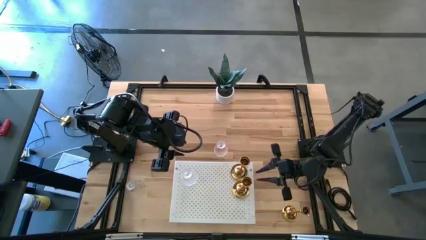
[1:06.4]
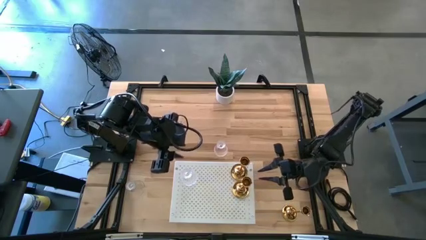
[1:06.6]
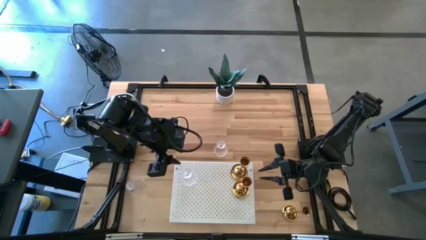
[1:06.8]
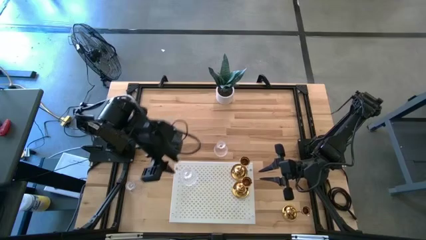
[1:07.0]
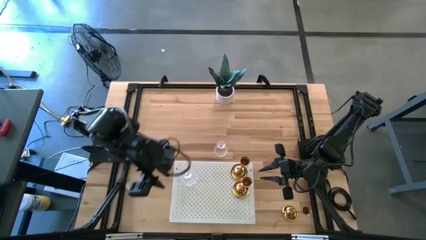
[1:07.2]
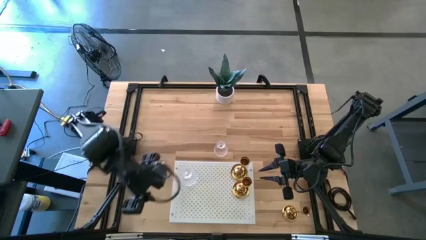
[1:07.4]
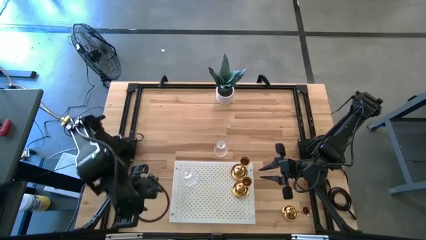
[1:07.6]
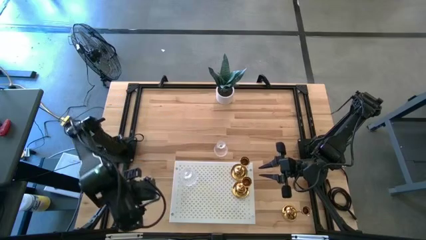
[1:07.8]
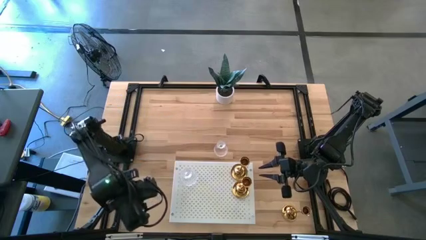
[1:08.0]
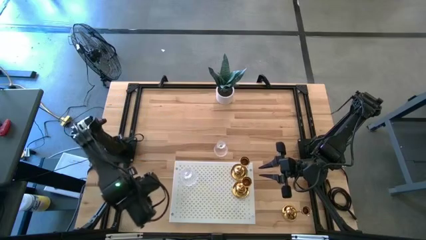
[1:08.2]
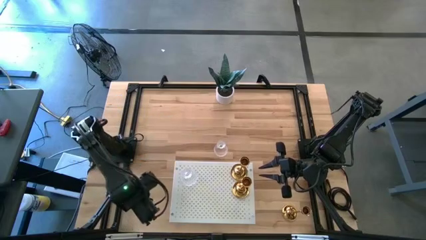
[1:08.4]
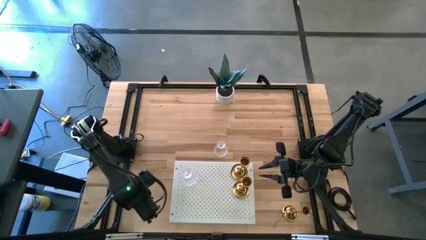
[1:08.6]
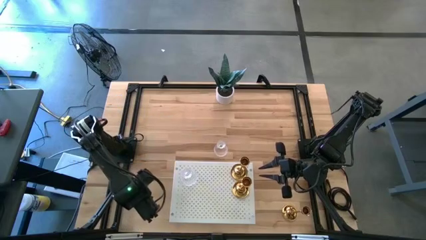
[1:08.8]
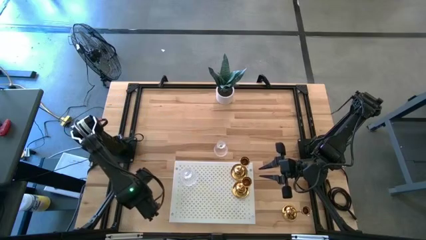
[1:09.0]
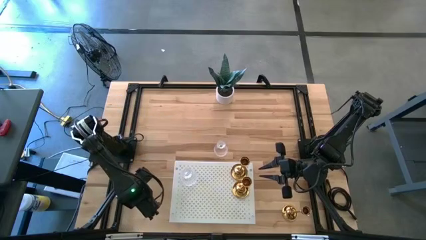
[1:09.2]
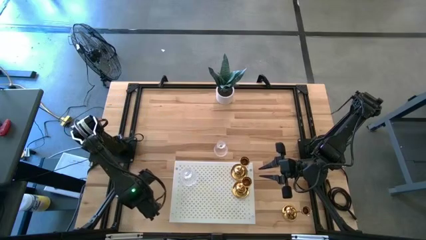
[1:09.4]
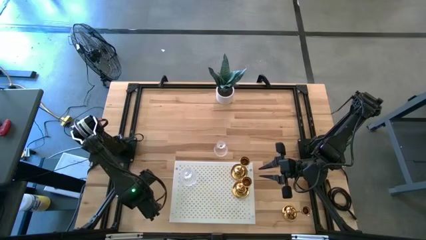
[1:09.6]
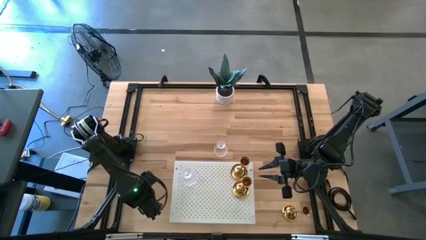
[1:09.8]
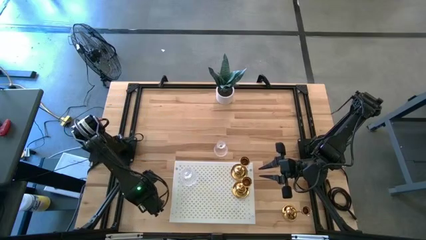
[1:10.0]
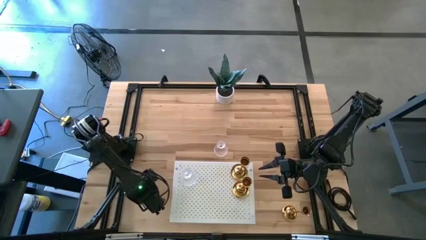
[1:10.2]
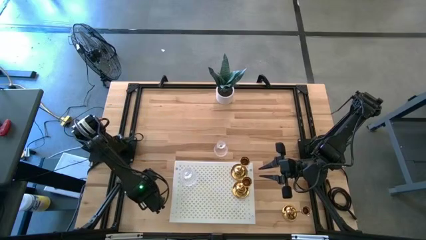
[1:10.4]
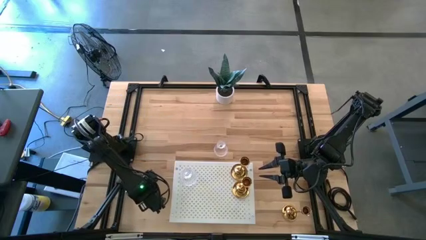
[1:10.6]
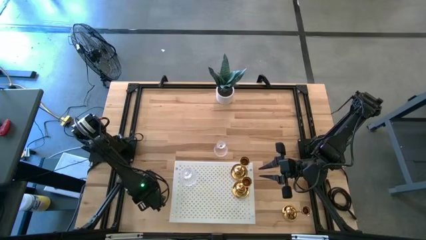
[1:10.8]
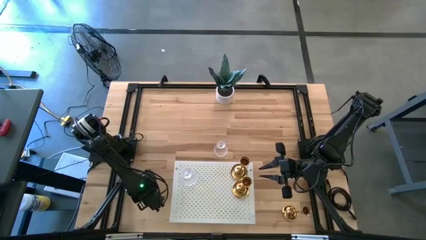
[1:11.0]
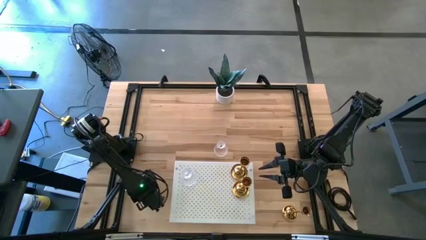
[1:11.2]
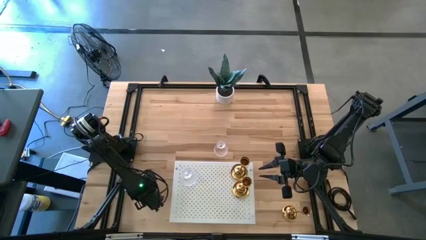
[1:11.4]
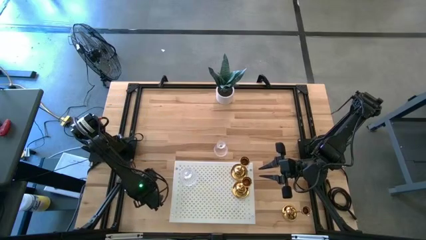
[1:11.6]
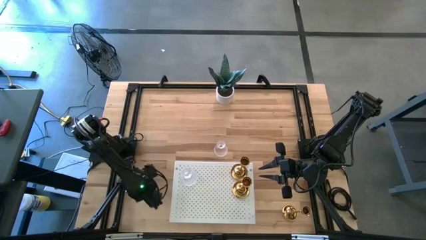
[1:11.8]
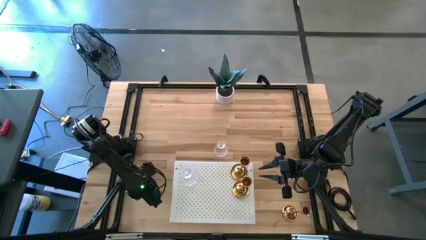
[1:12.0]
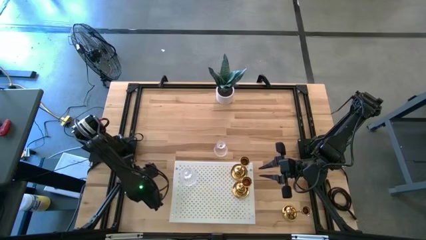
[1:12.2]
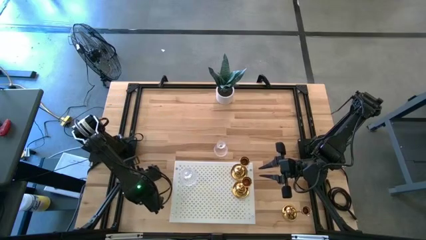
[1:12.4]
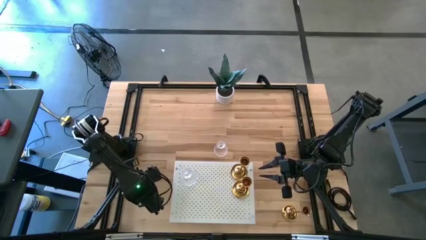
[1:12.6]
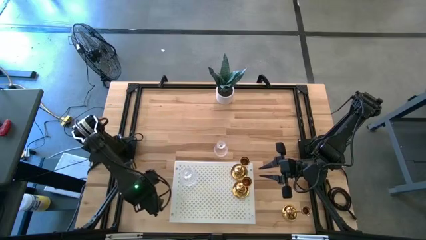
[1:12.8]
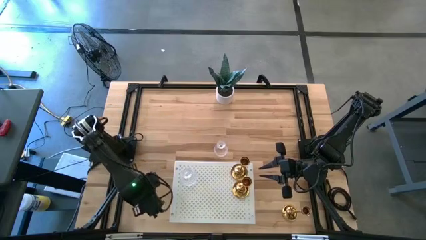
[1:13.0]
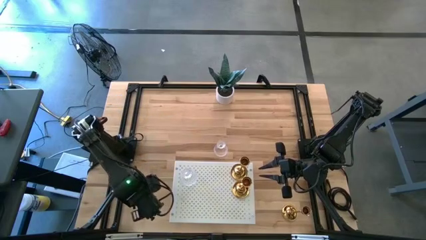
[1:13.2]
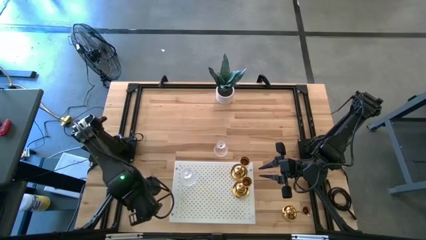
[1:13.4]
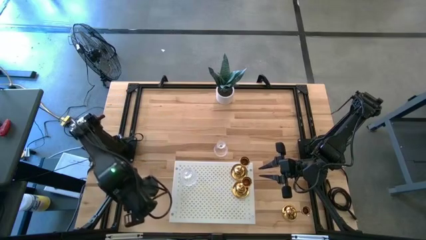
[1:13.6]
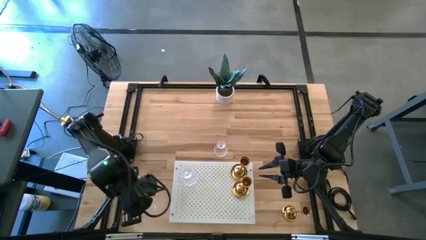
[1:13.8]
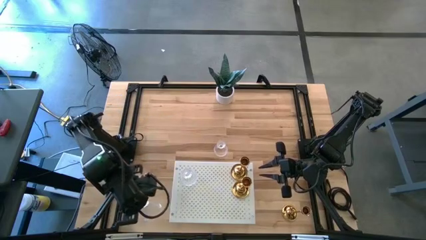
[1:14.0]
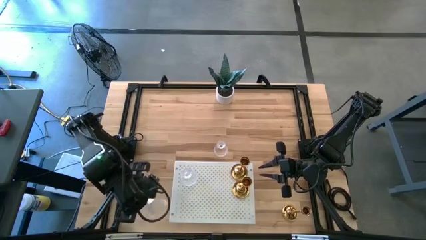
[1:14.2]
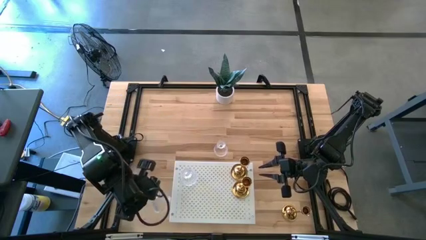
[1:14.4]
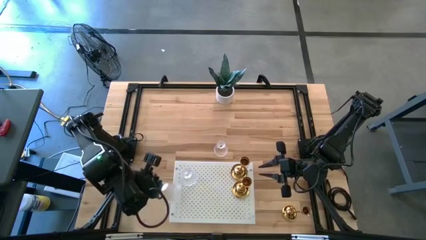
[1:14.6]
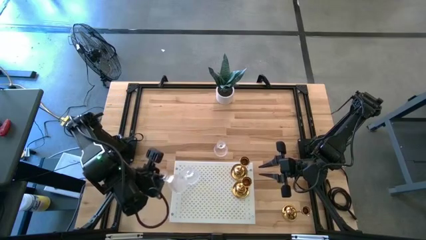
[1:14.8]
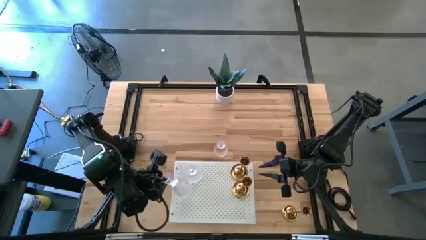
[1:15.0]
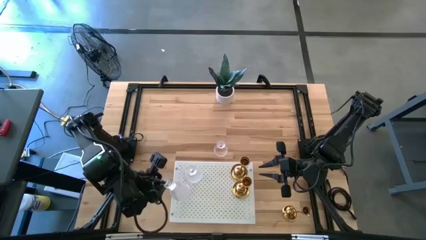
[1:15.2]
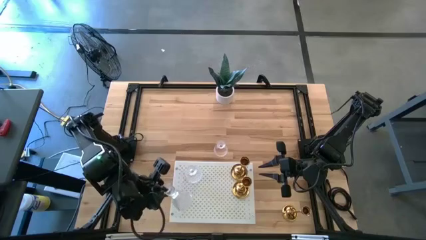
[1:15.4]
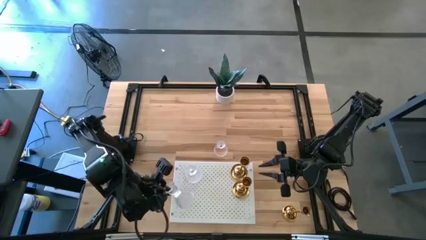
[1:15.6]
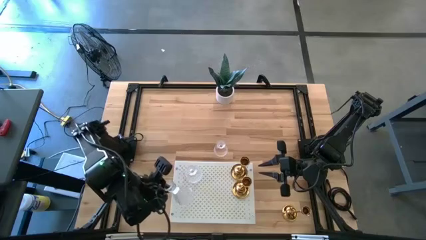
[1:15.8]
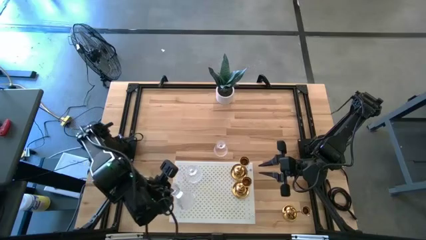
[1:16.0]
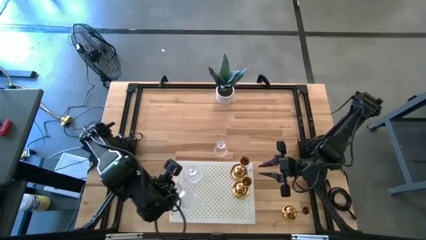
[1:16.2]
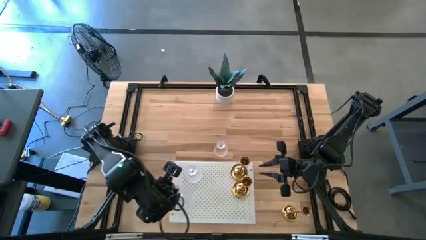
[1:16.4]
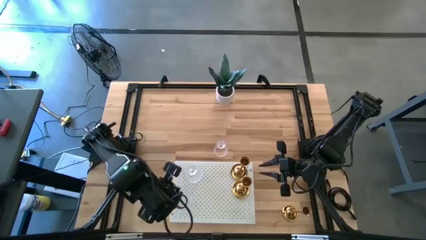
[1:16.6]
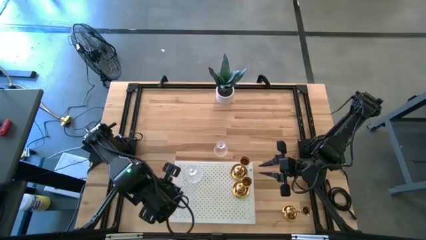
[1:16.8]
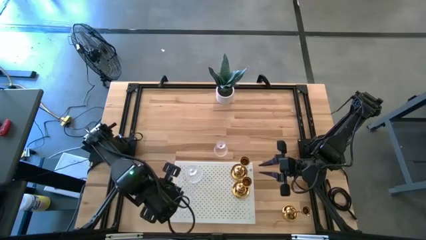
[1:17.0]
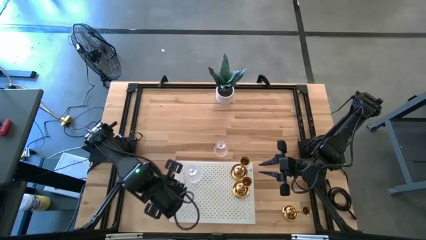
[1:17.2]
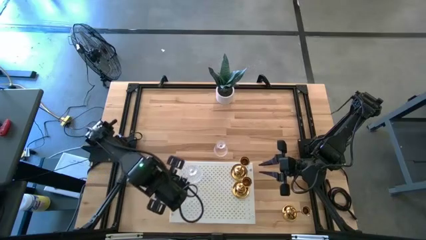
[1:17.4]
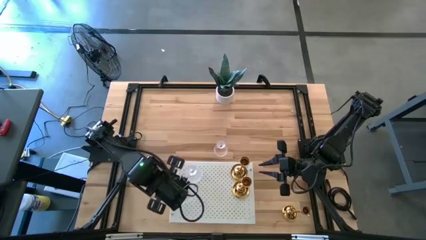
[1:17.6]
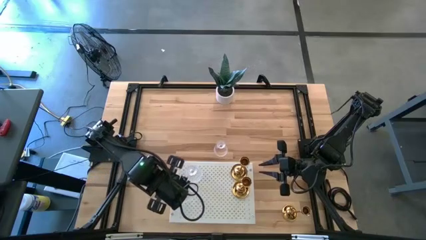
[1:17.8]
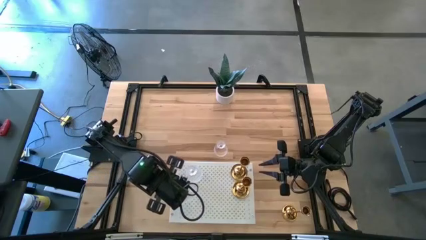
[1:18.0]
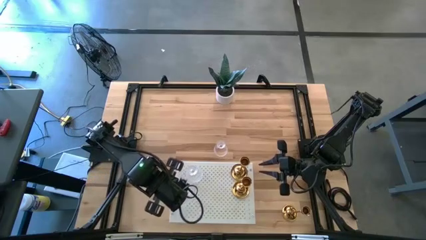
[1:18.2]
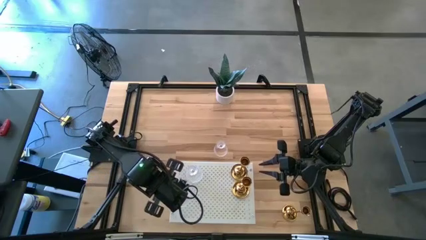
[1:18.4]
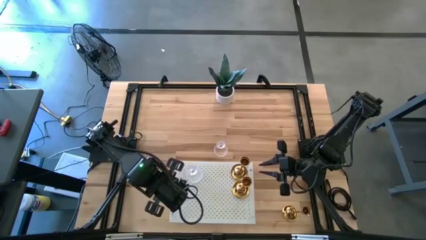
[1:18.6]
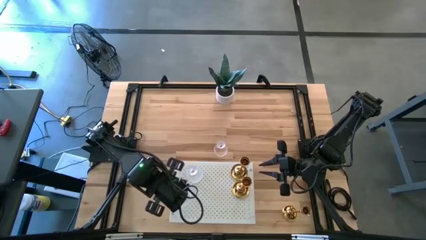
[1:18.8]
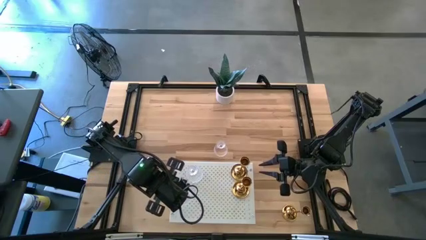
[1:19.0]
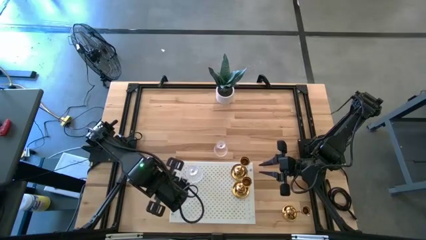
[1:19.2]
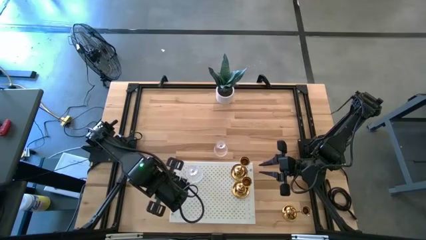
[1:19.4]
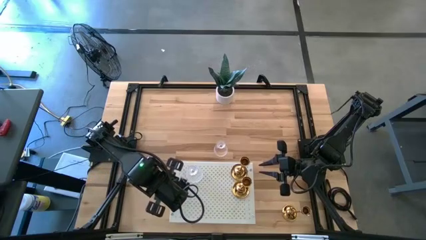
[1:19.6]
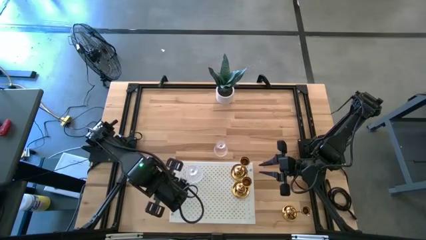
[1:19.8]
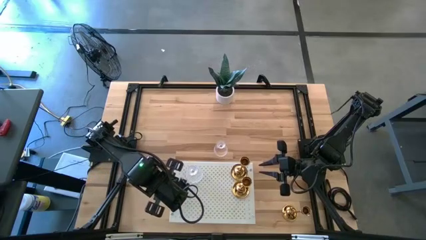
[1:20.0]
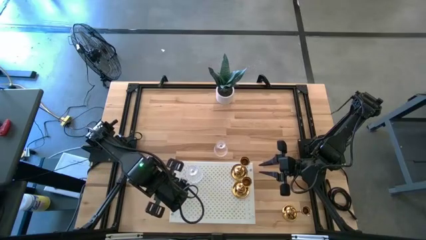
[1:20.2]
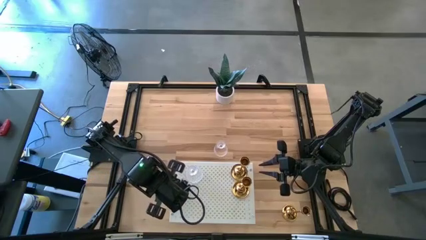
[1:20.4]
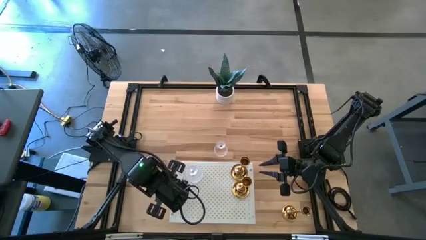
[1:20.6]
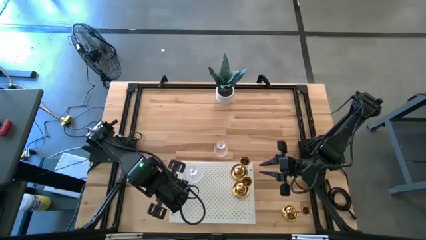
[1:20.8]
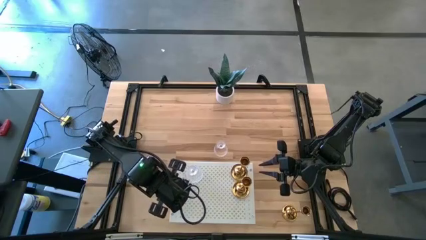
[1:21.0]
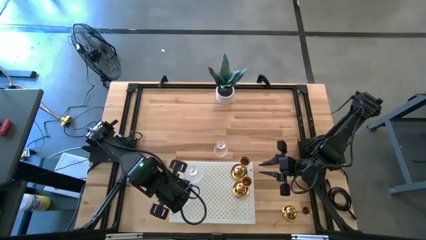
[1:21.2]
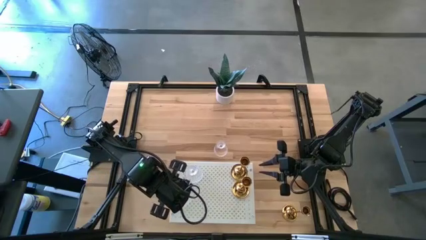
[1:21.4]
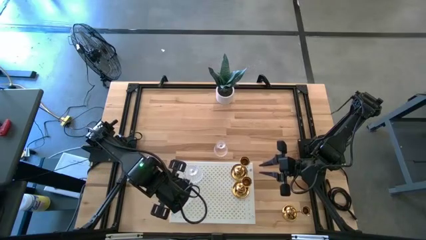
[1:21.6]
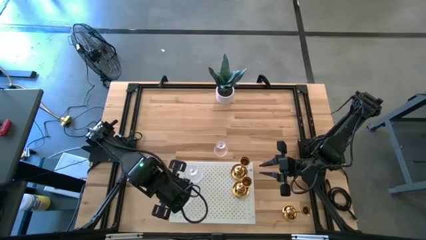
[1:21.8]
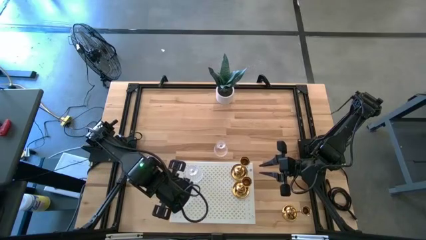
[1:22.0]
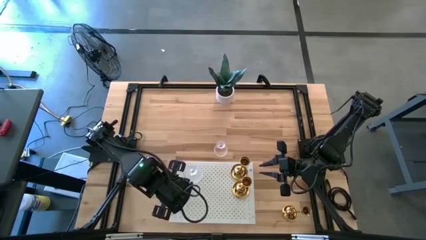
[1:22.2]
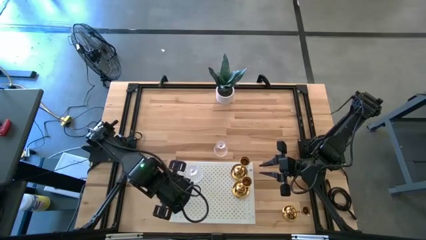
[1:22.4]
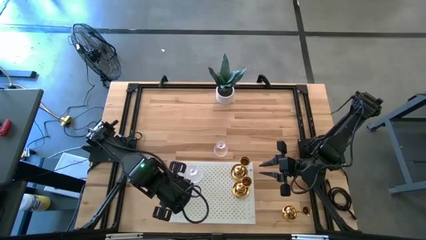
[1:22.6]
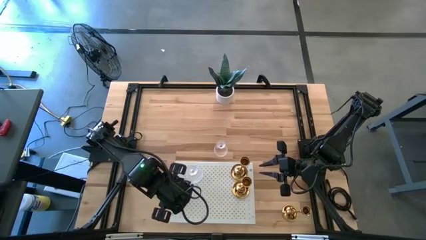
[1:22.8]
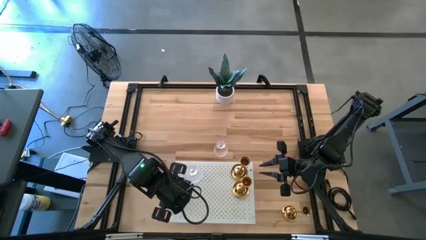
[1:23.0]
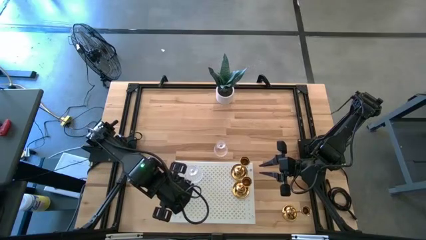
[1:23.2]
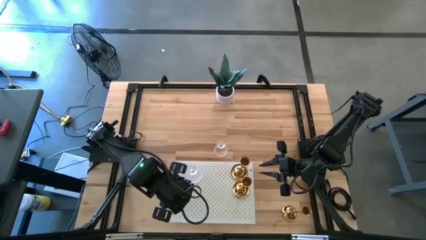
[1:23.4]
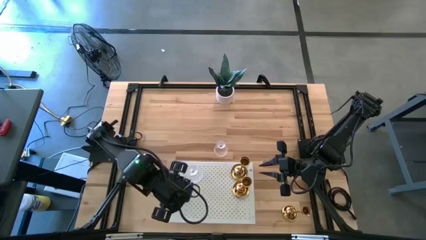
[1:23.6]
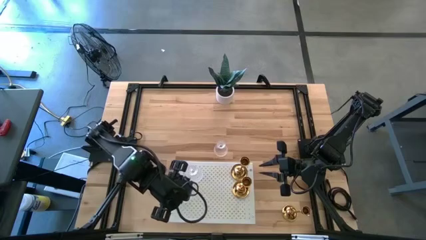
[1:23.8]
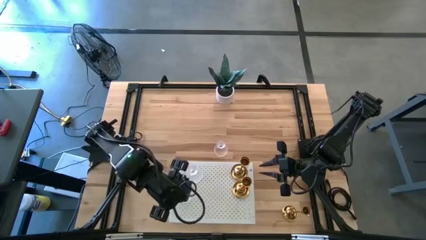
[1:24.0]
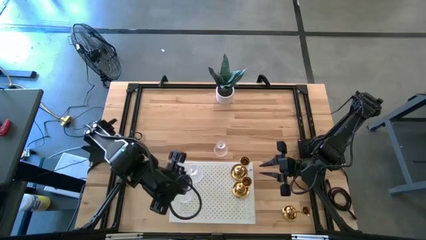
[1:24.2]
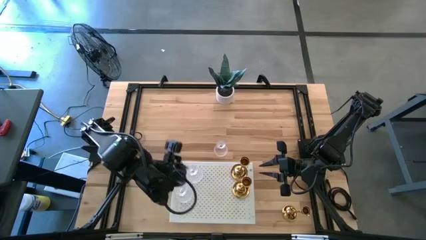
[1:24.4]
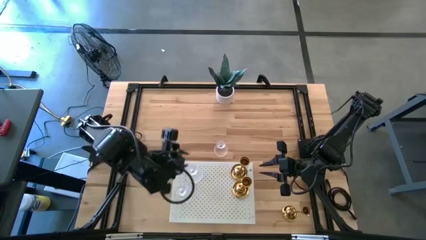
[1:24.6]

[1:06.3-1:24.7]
Task: Pick & Place candle stick holders
Put the bottom left glass candle holder on the shelf
